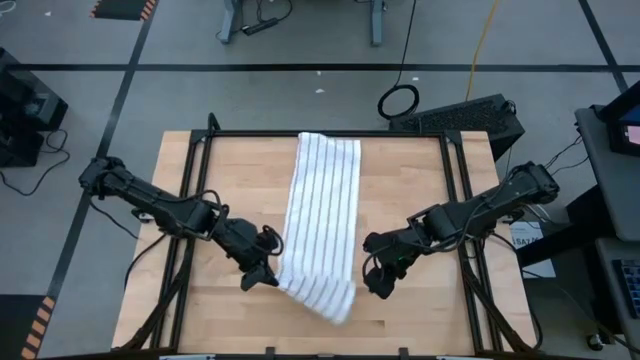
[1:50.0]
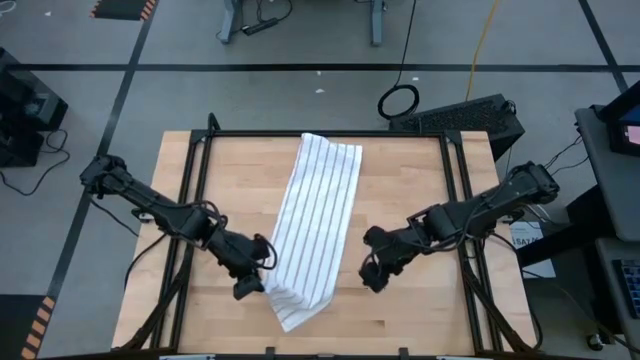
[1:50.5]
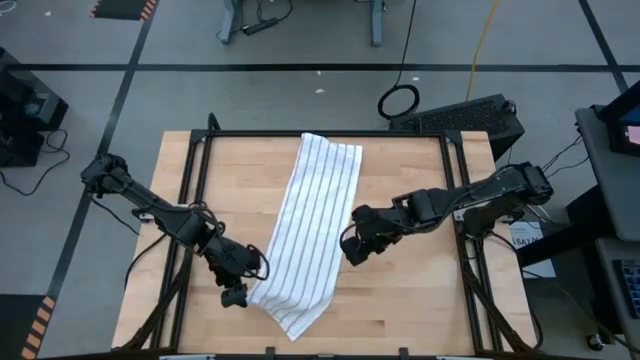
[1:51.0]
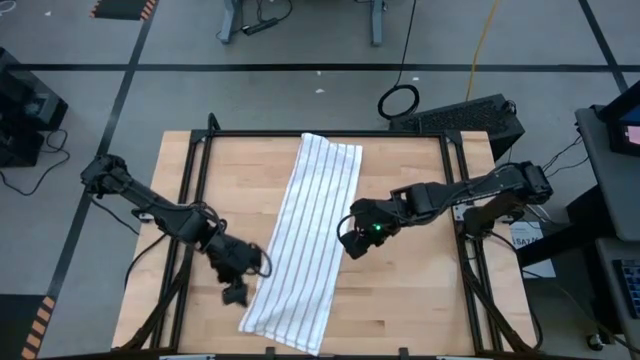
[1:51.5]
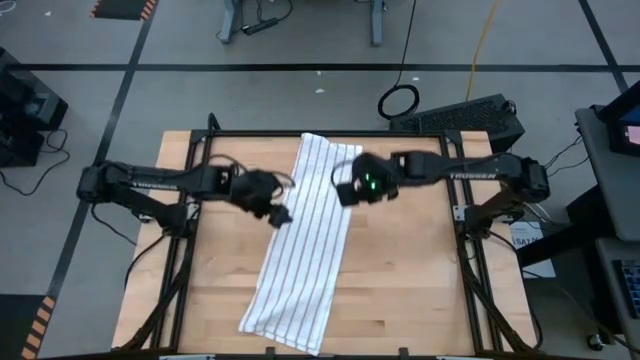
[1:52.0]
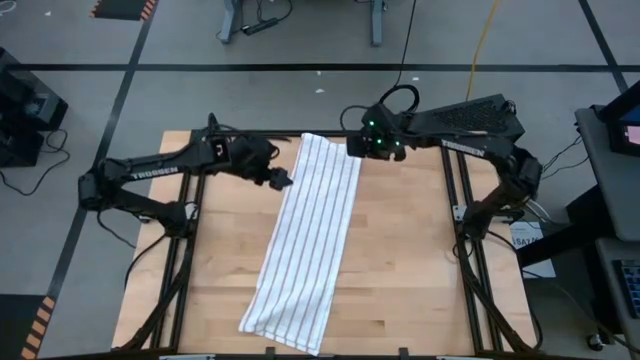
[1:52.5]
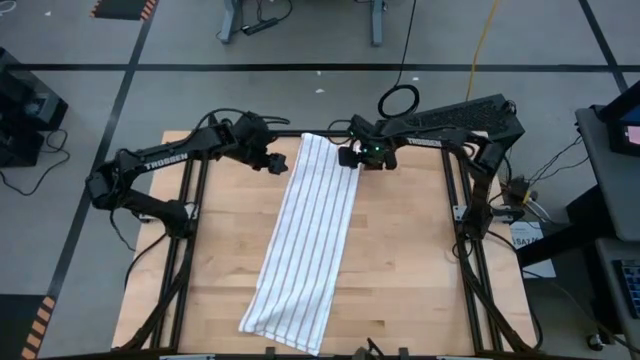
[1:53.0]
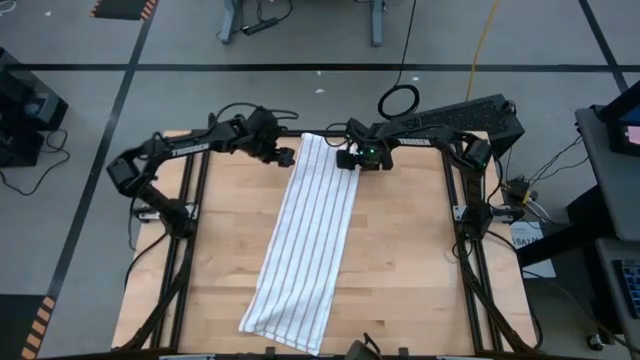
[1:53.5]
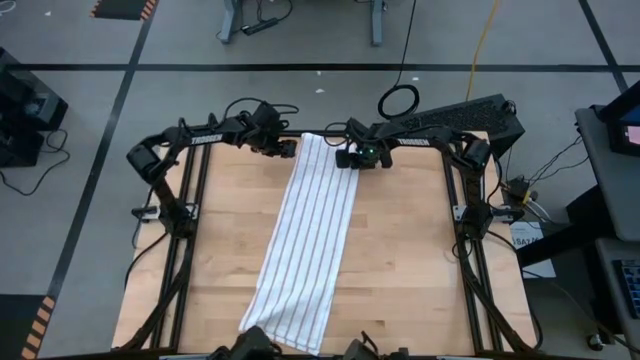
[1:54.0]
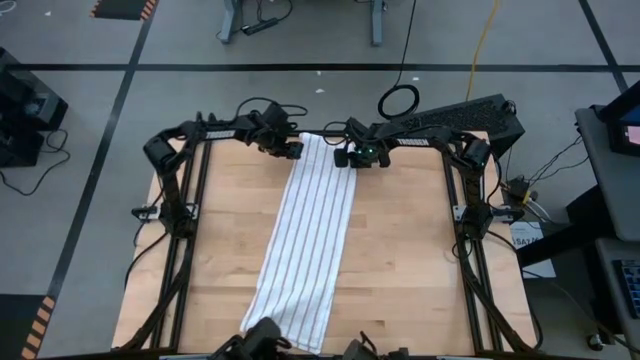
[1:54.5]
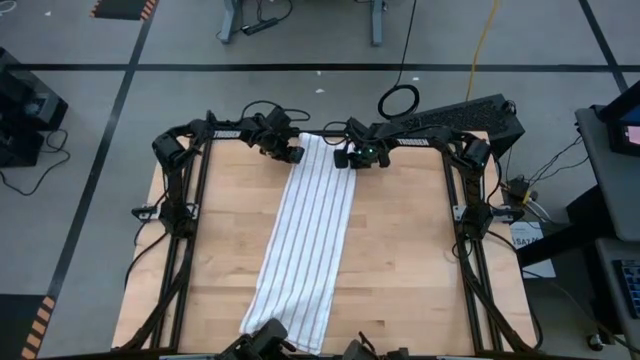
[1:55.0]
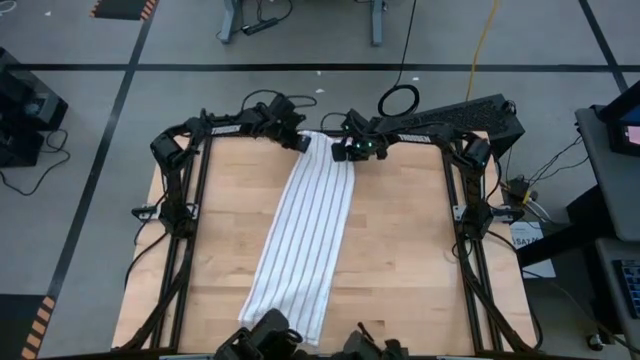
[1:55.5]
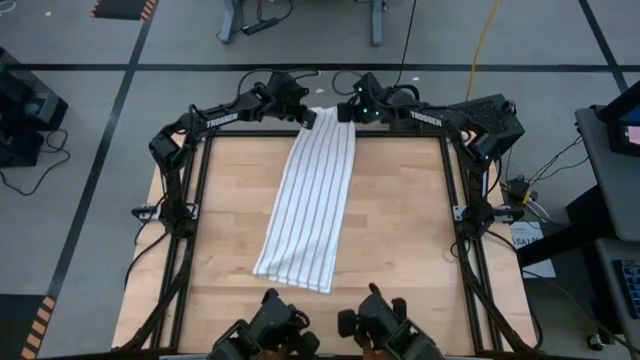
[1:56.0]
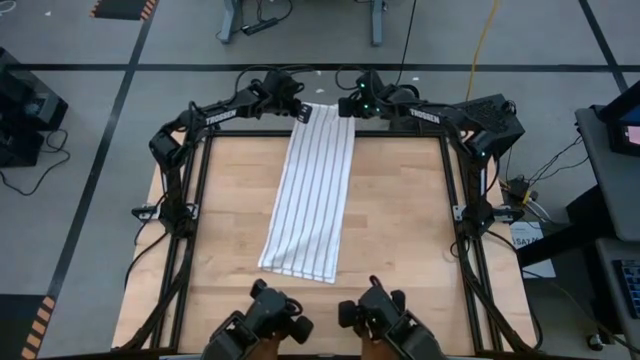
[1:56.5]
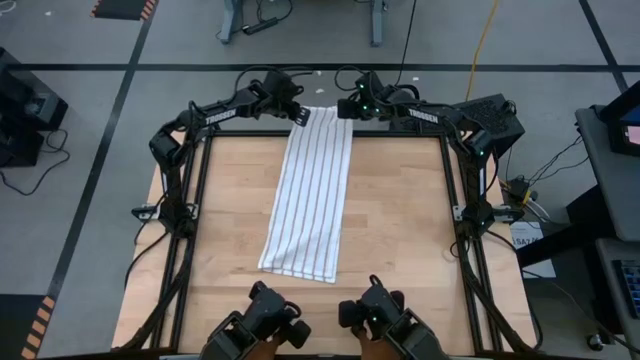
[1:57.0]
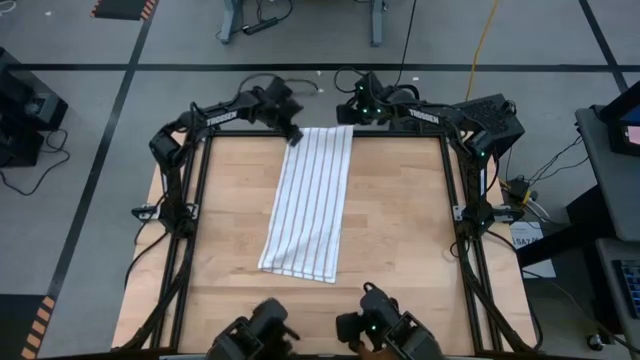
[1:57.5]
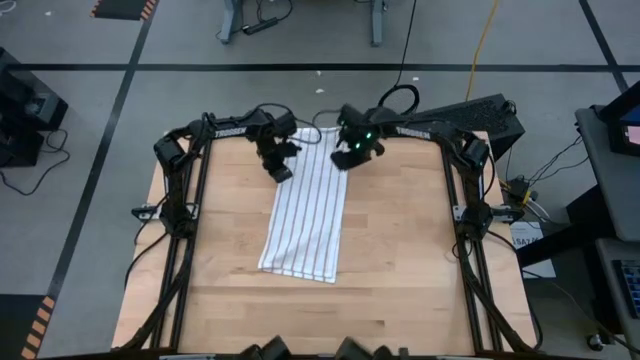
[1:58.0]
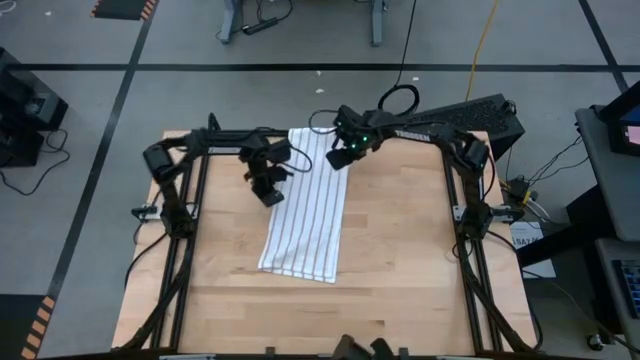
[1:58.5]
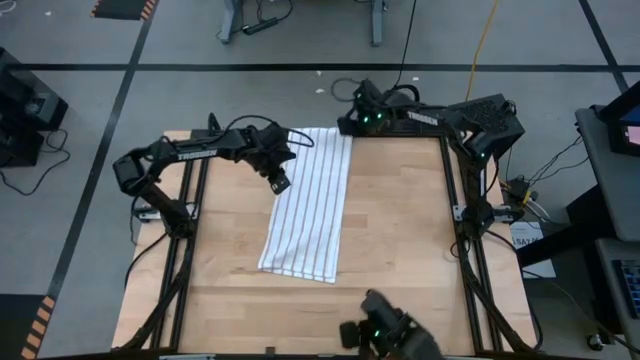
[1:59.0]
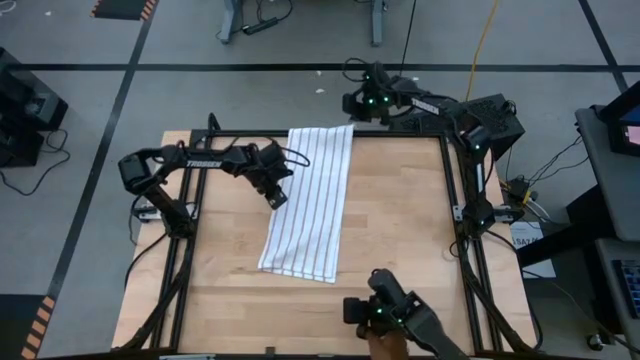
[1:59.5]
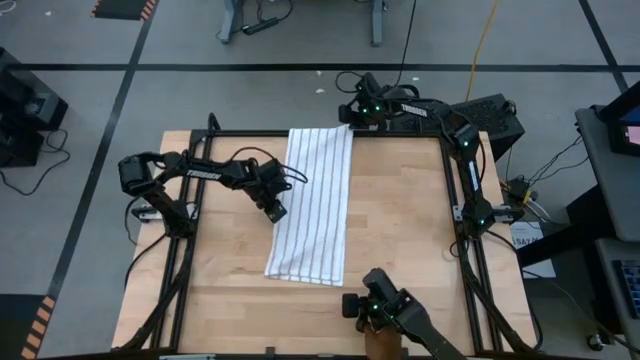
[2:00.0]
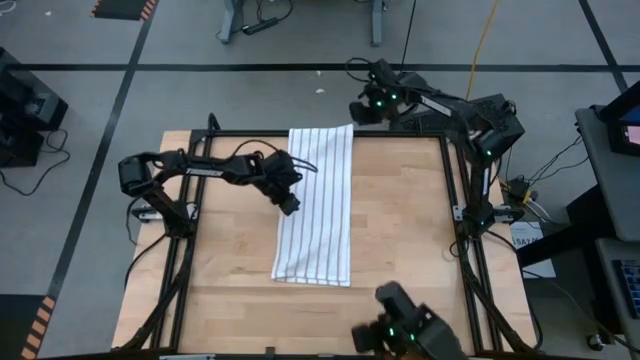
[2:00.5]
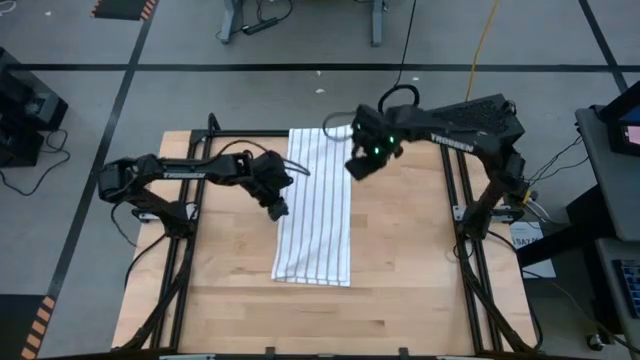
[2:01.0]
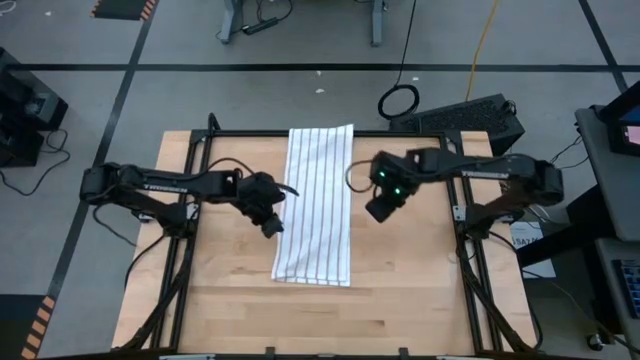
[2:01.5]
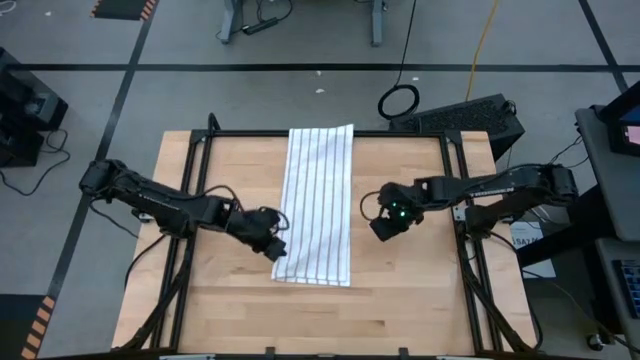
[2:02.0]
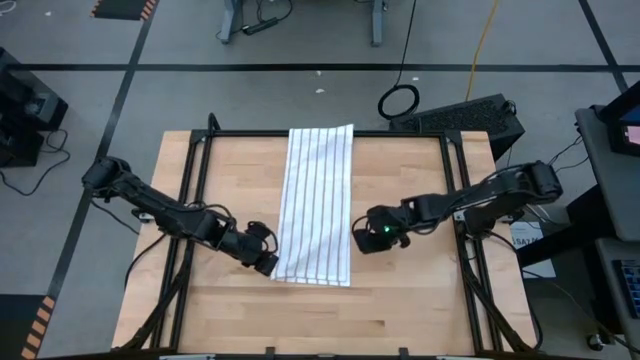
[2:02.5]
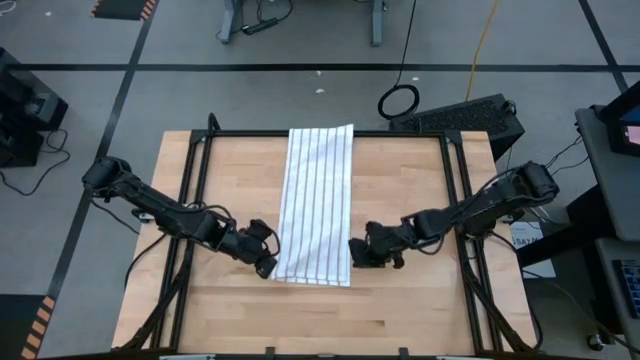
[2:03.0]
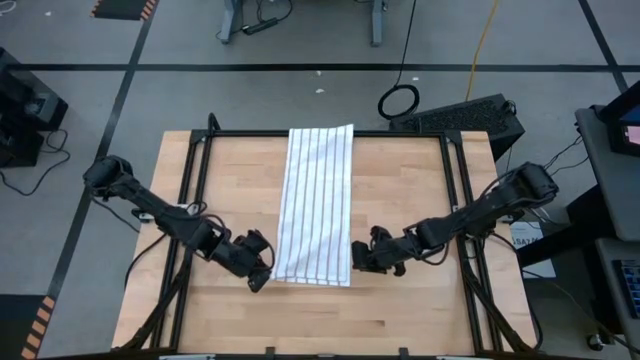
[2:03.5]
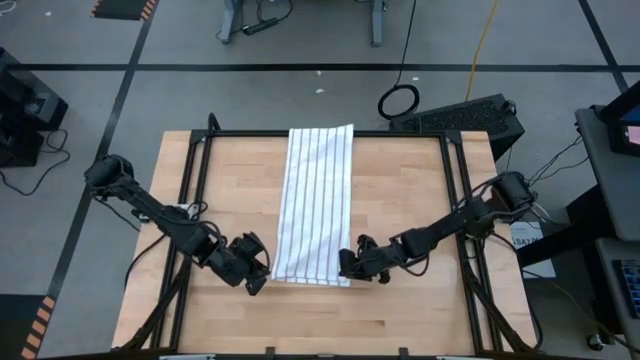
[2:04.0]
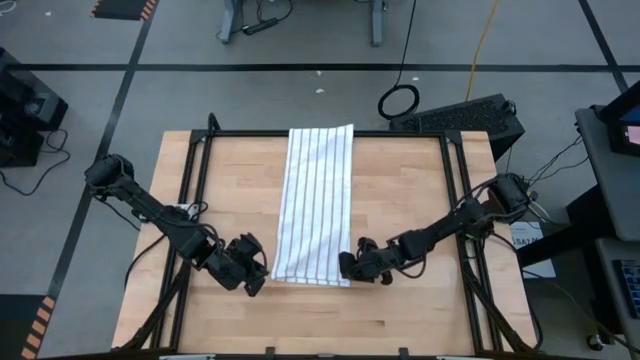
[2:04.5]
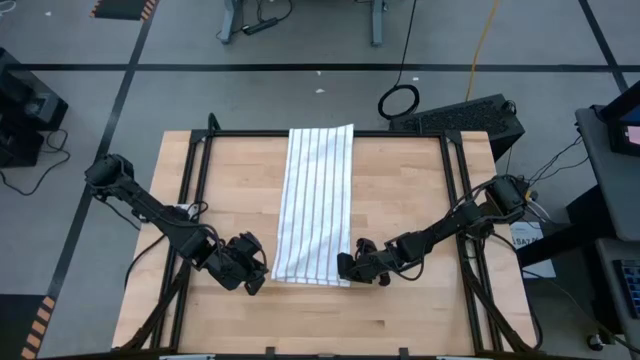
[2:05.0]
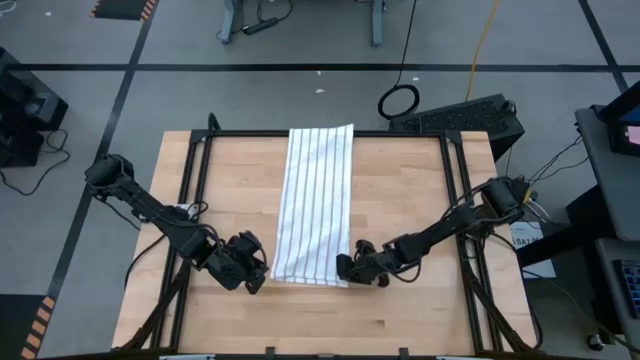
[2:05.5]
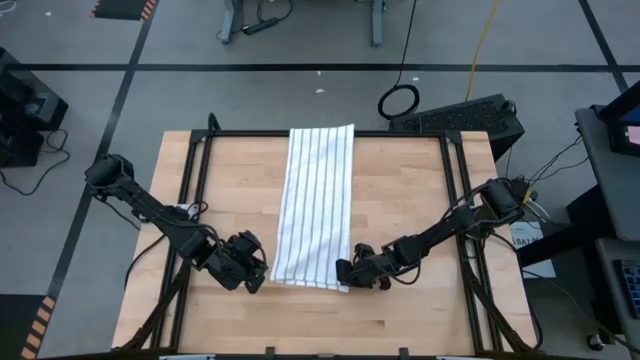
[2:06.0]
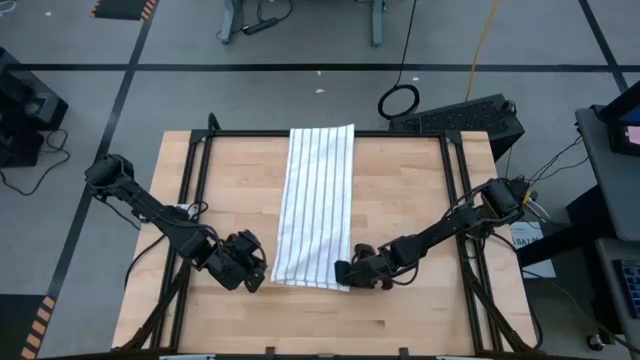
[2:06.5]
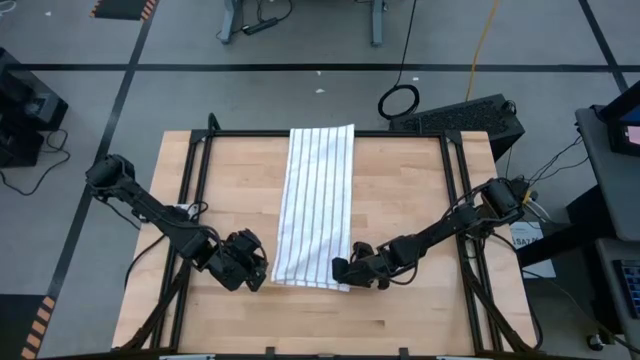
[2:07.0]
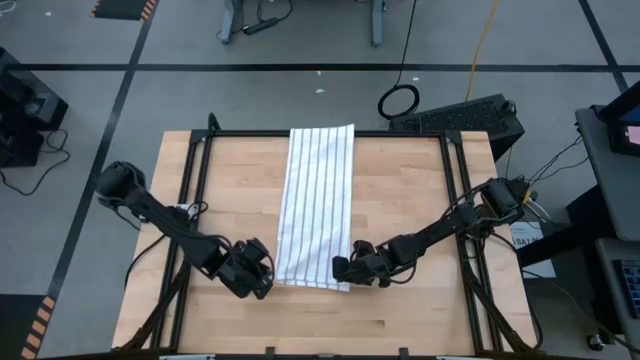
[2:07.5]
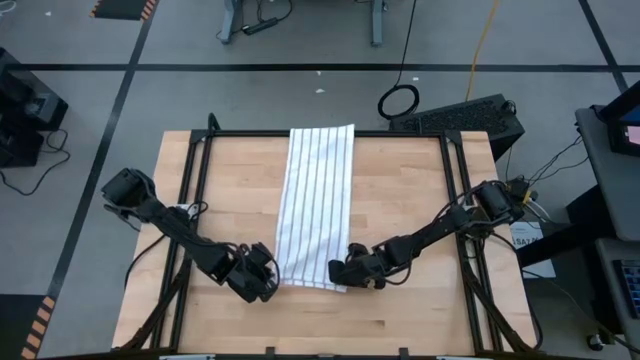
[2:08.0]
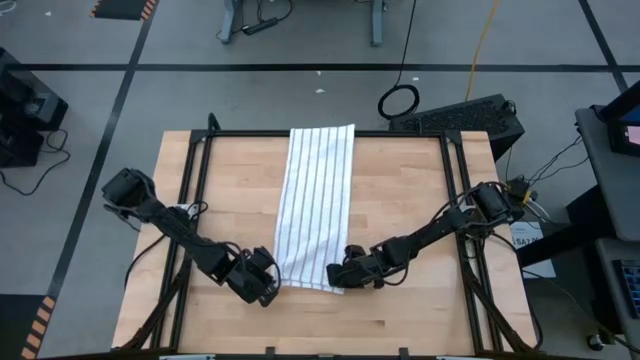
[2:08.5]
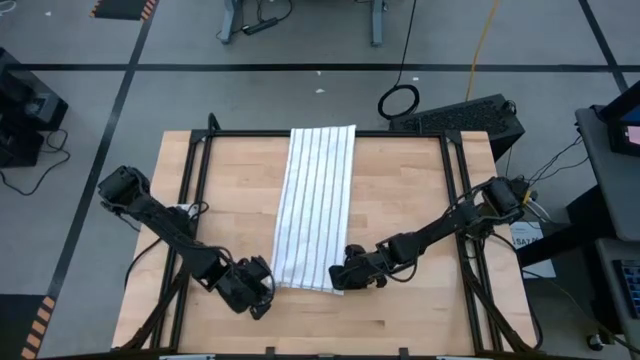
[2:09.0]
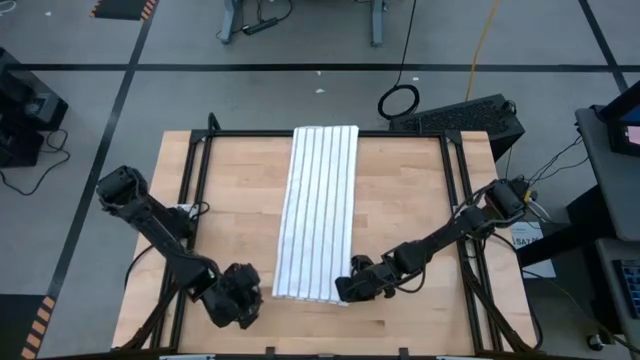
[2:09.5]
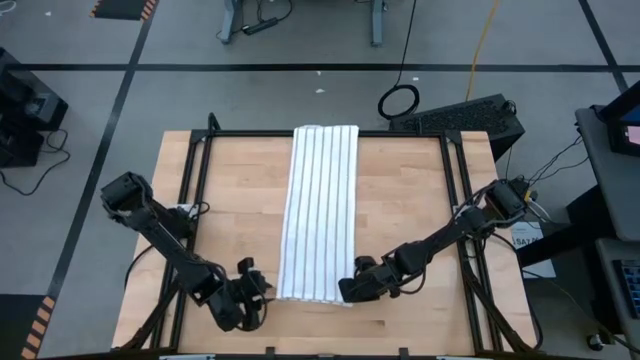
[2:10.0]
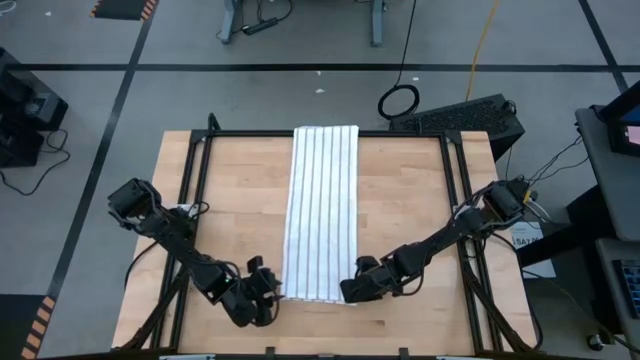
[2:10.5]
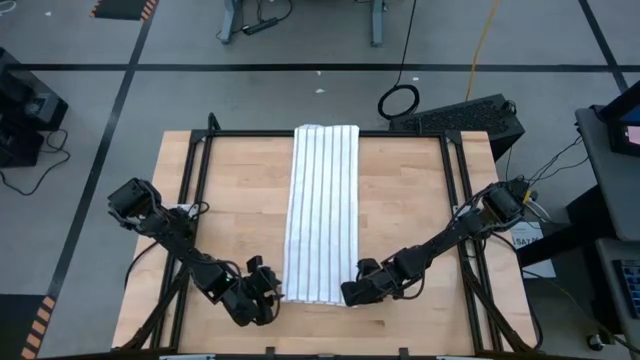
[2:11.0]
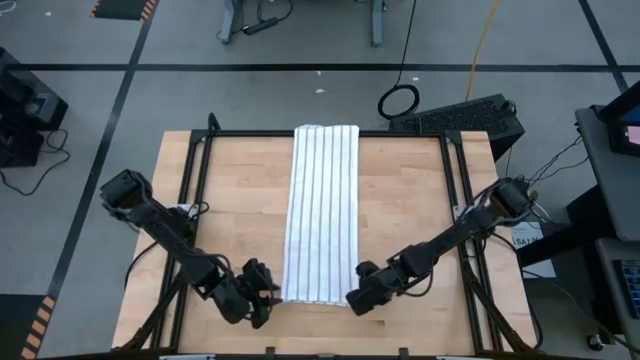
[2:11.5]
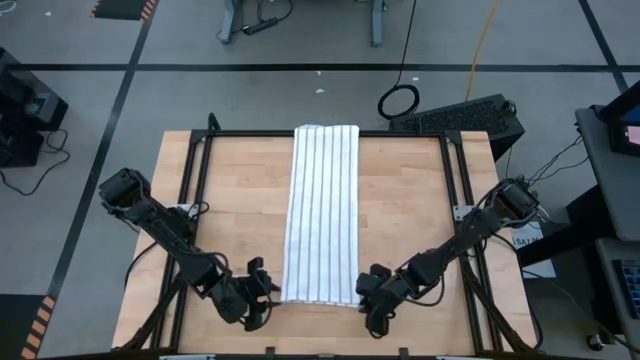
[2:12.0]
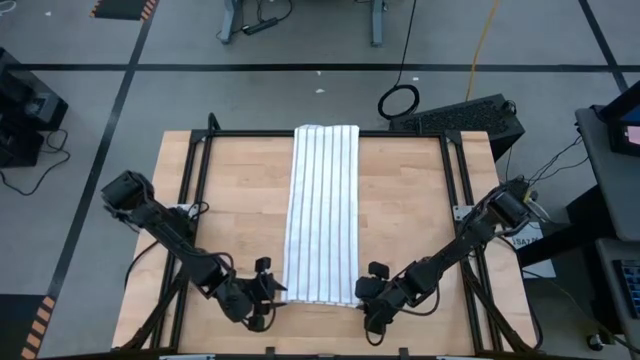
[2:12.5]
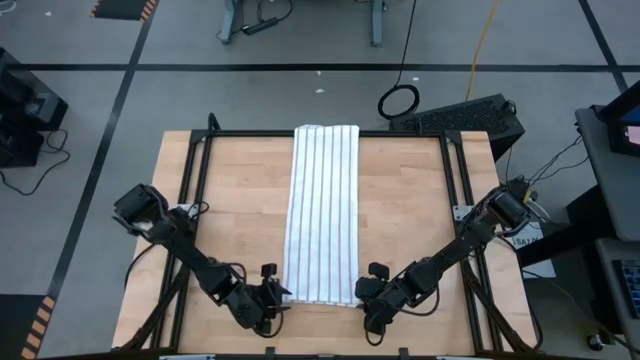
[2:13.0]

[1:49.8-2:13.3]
Task: Roll towel into tight, uniform cylinder
Fold the white brown kitchen towel
